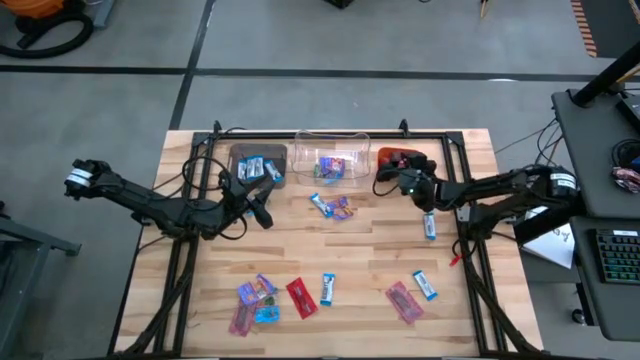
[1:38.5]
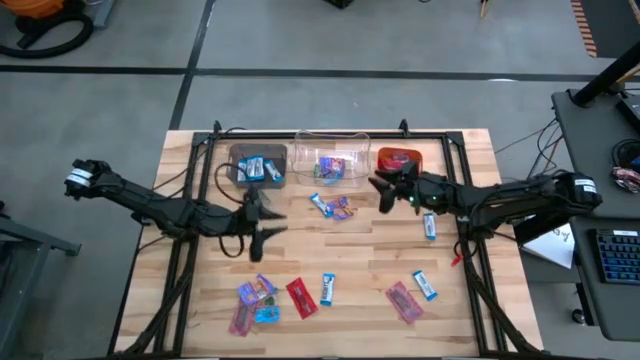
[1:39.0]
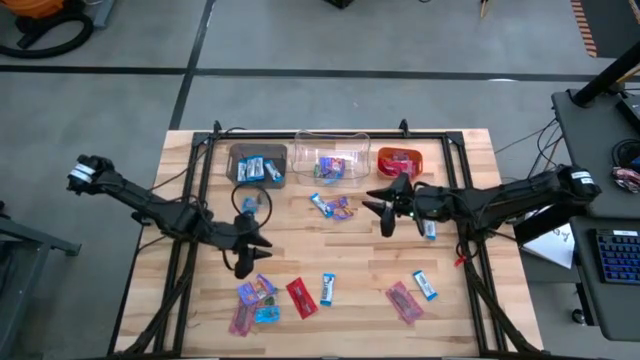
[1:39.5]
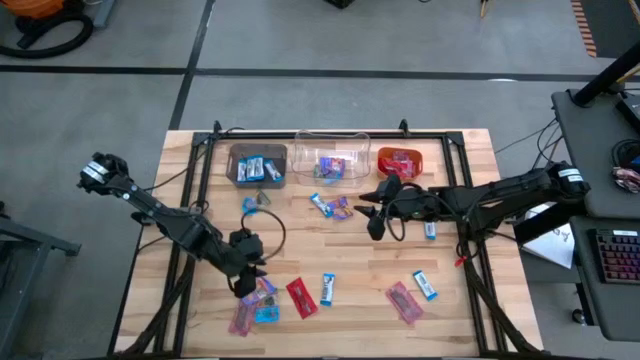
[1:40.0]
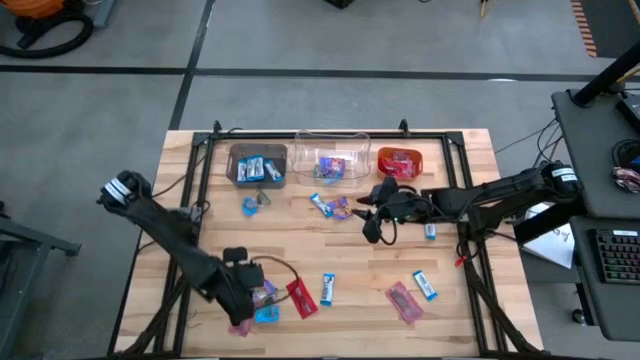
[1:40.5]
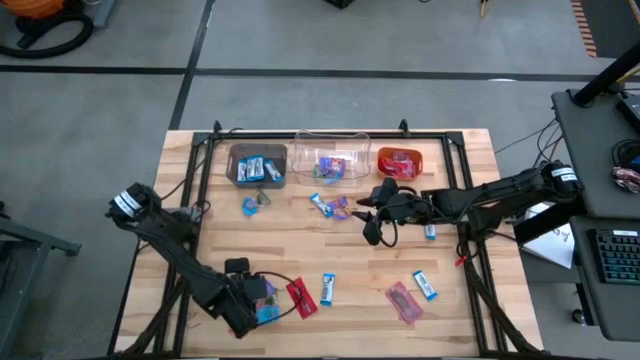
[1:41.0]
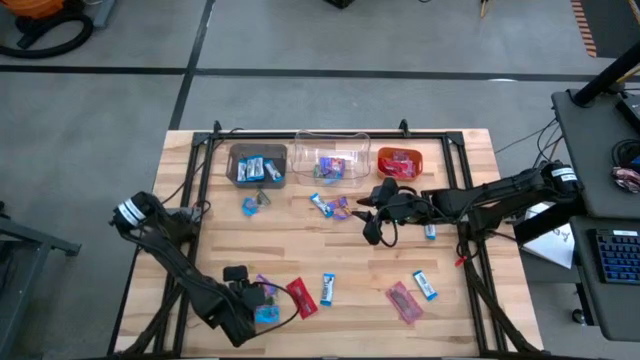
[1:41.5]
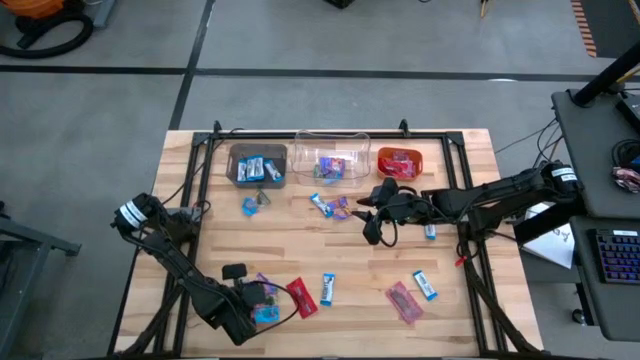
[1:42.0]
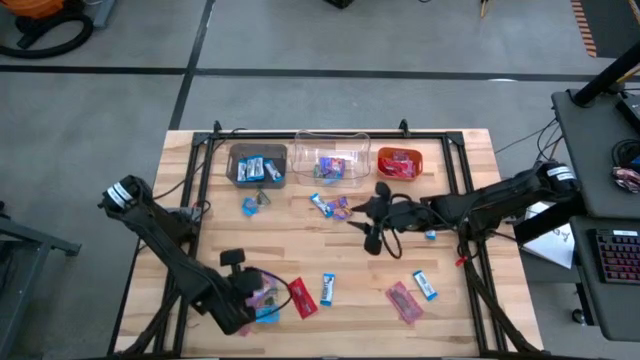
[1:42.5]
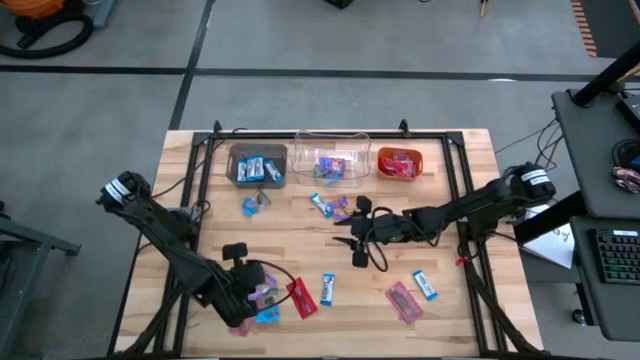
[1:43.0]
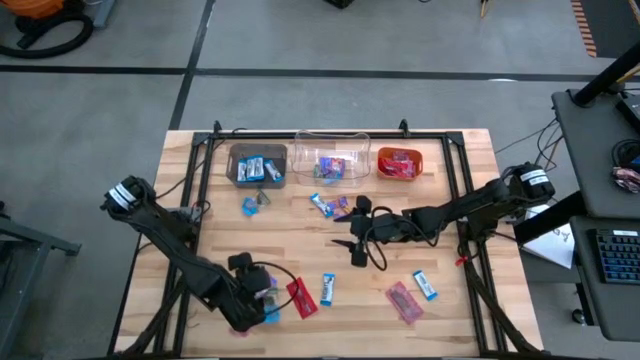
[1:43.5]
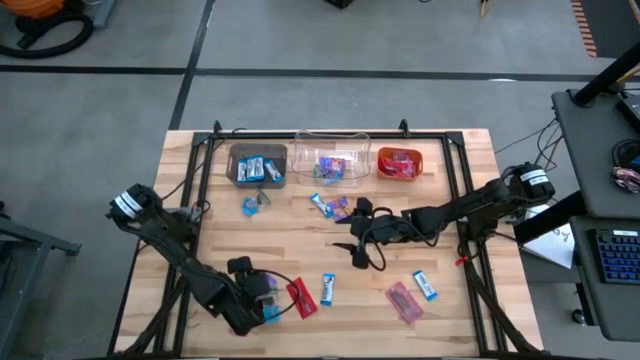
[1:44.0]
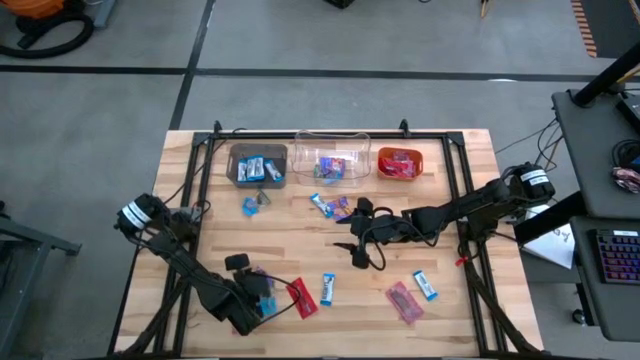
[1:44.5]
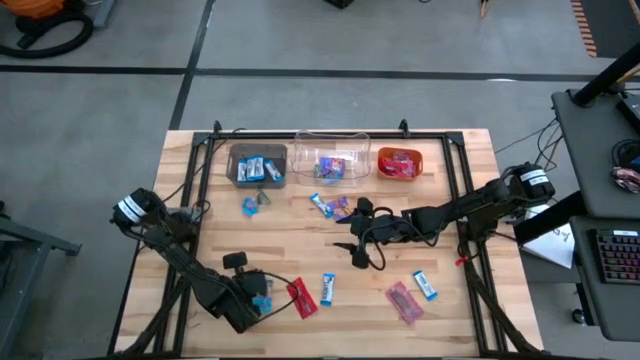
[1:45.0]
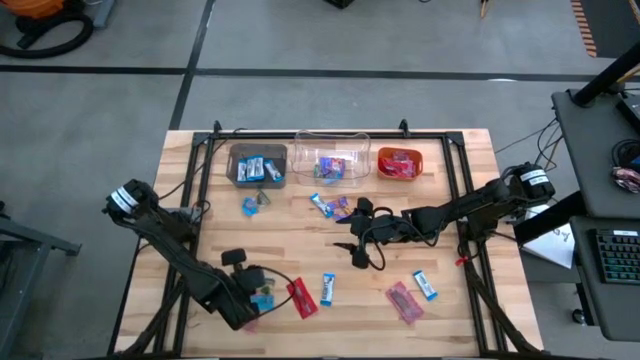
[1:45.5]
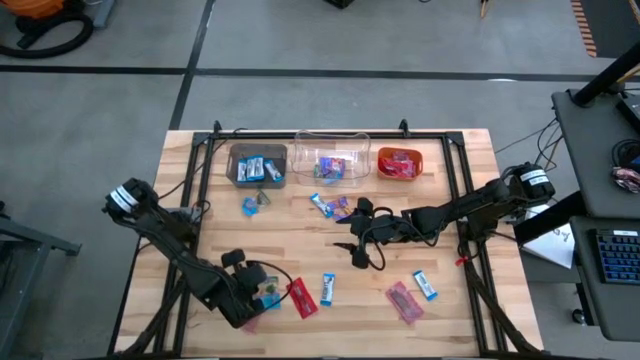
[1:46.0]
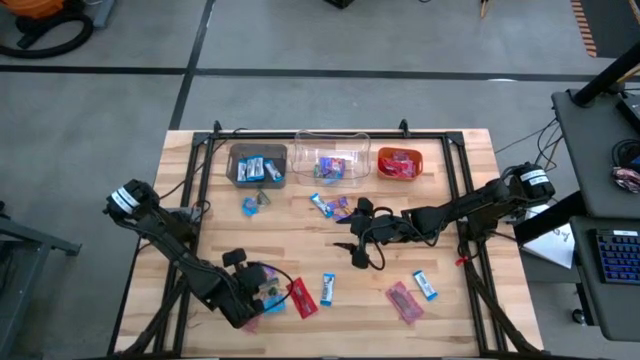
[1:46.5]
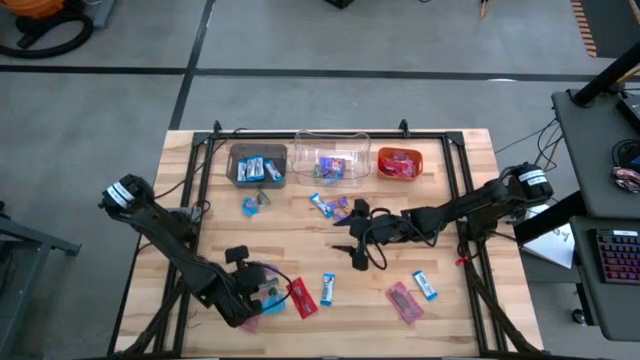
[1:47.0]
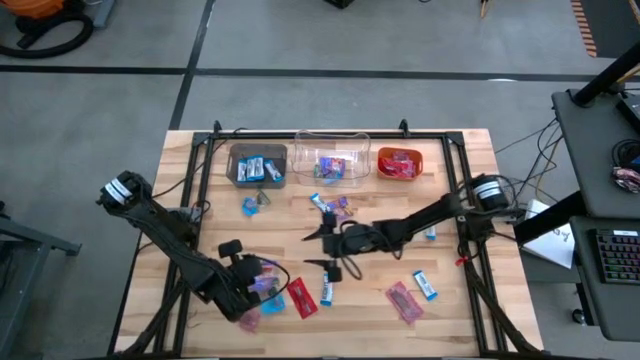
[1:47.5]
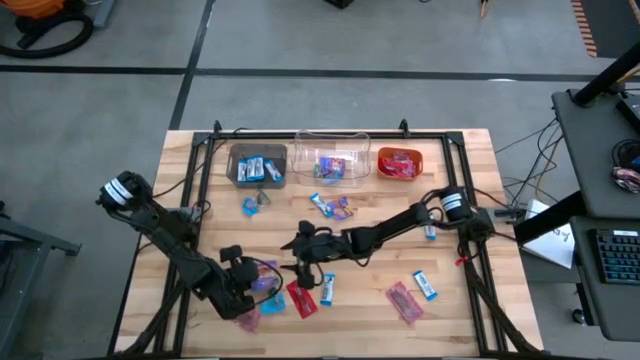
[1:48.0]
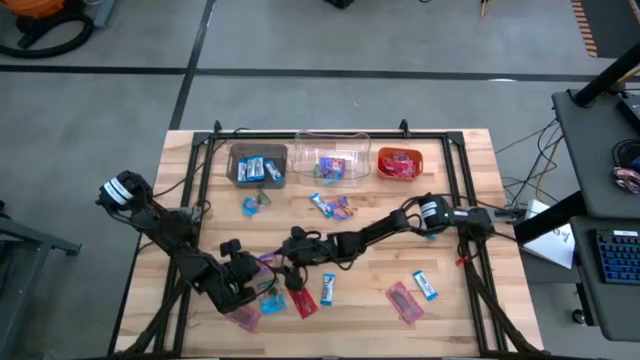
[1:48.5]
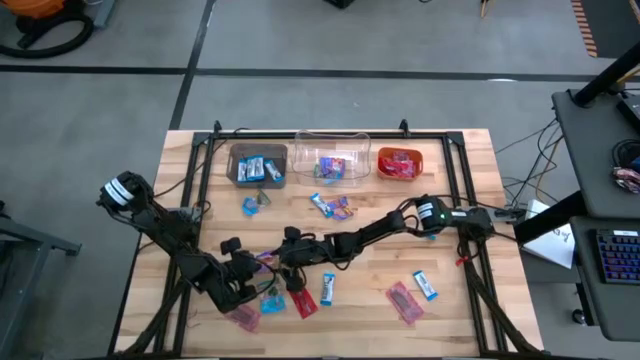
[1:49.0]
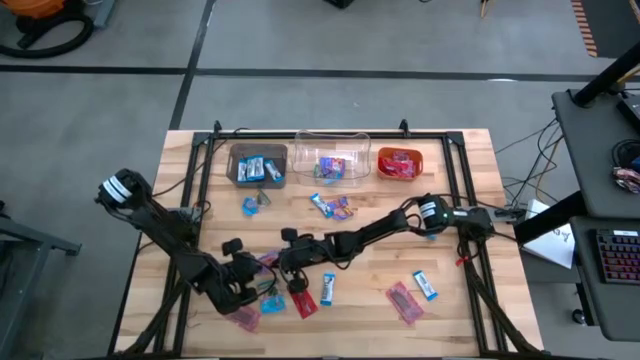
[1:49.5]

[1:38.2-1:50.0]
Task: Sort candy
Put the blue candy into the transparent bin

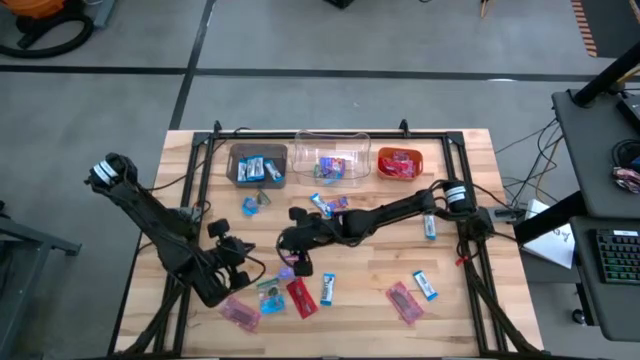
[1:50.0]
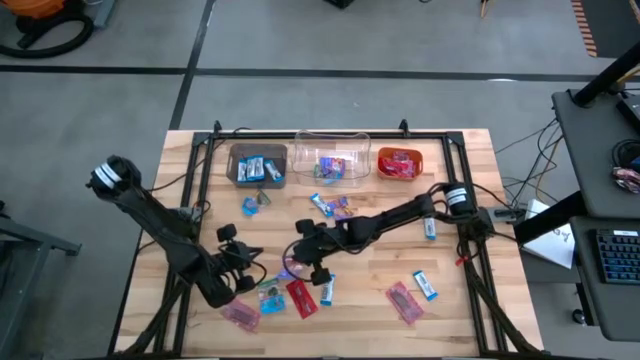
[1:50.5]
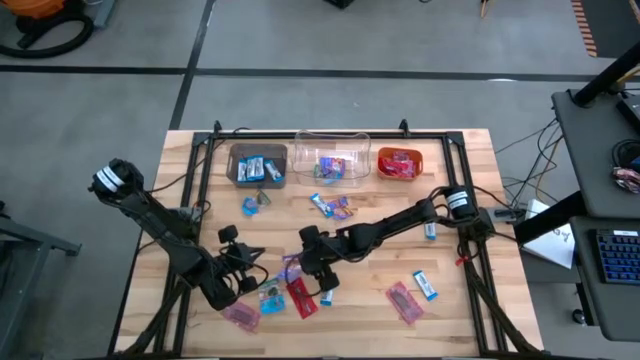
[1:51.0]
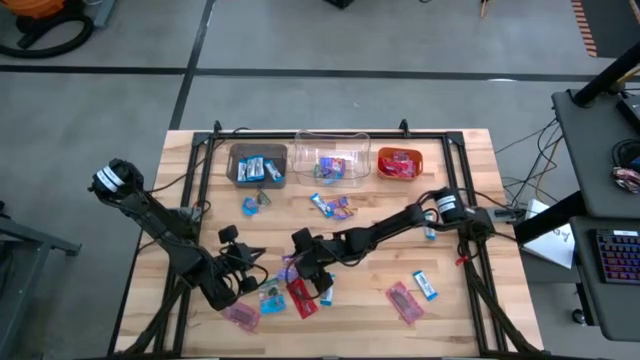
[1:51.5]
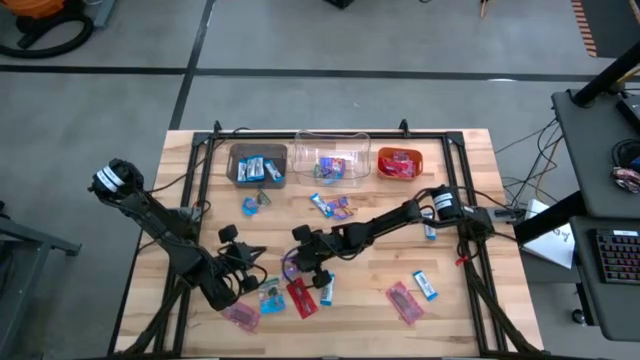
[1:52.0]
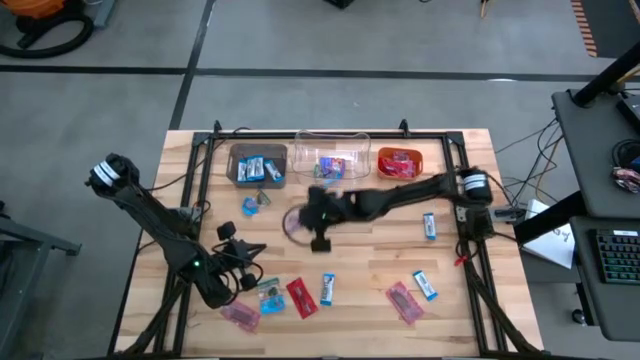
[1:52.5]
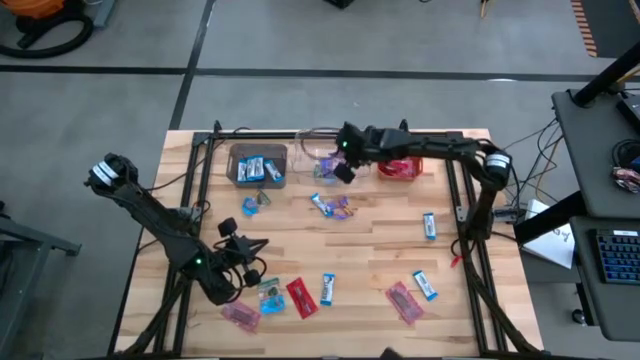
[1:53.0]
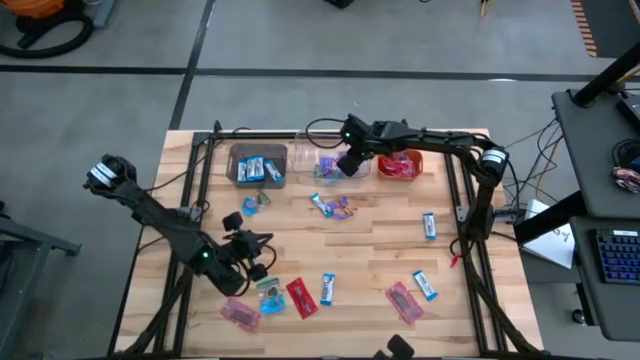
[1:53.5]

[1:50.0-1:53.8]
Put the blue candy into the transparent bin

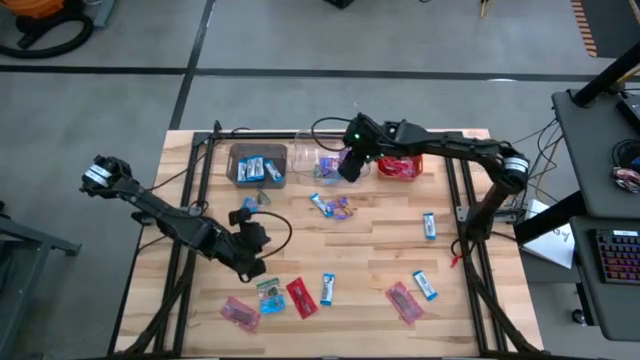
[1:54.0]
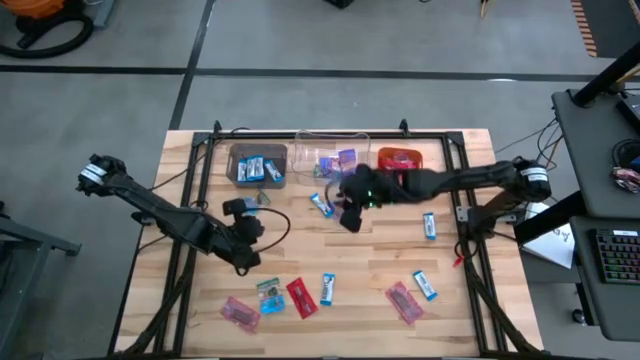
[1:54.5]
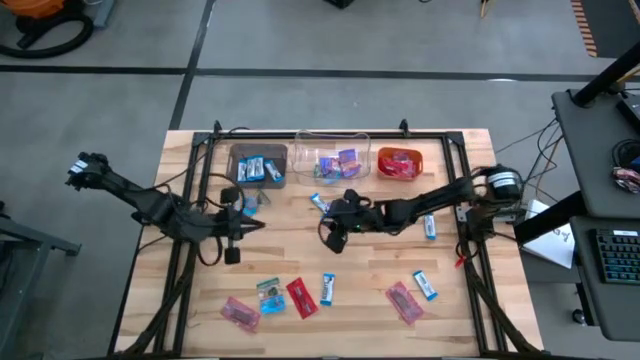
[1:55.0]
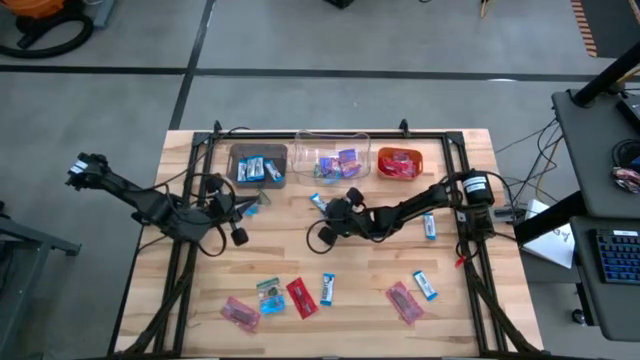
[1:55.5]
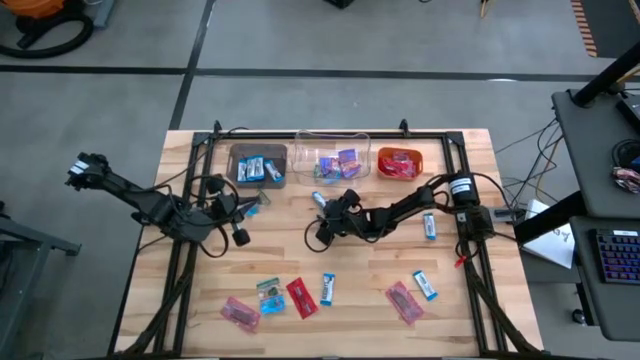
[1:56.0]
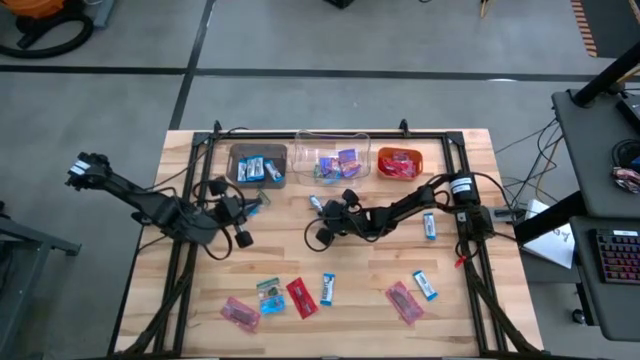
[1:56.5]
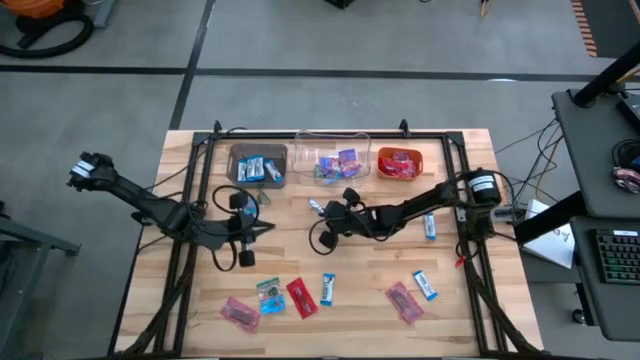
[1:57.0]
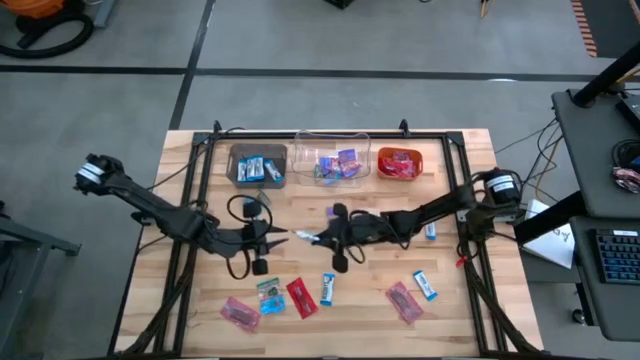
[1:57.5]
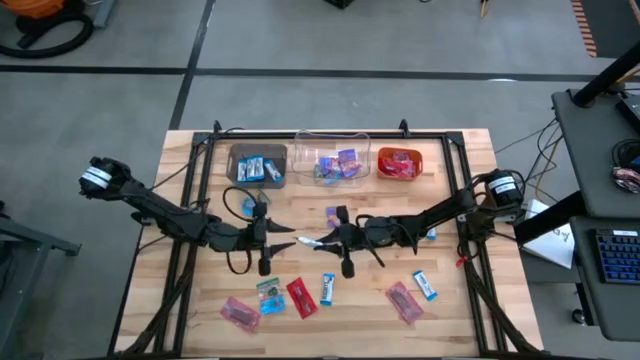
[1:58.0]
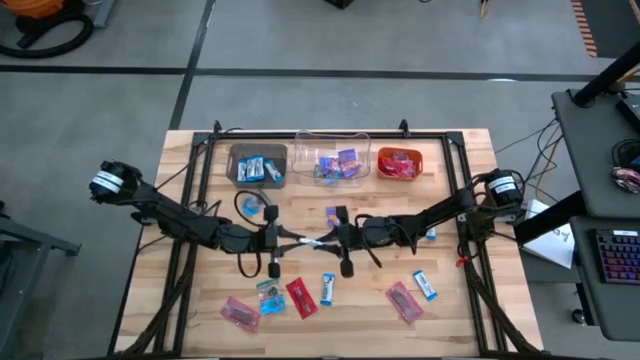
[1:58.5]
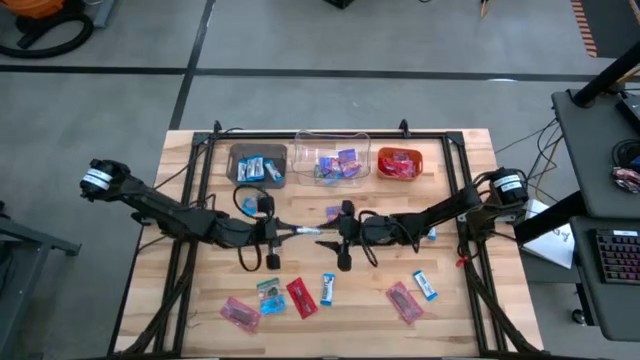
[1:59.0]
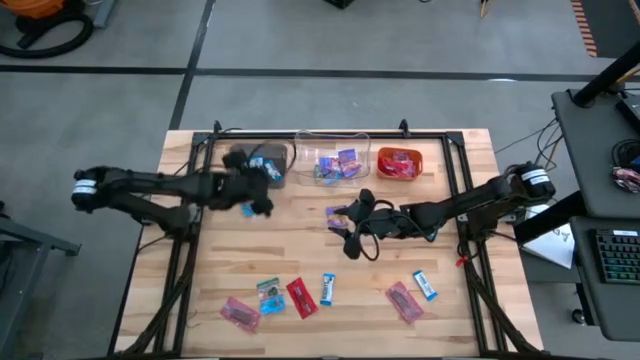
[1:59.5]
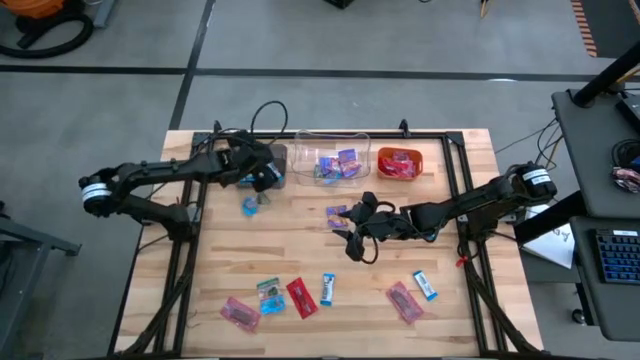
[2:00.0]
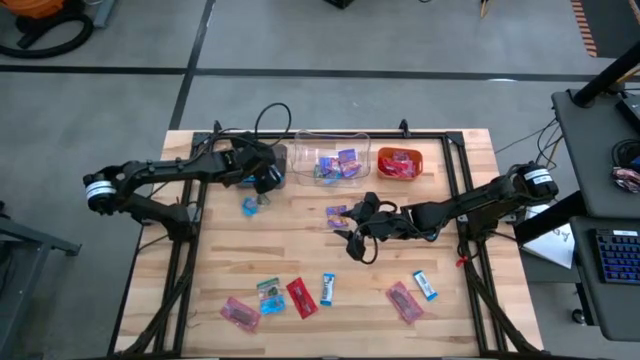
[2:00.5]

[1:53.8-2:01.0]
Put the white candy into the black bin
